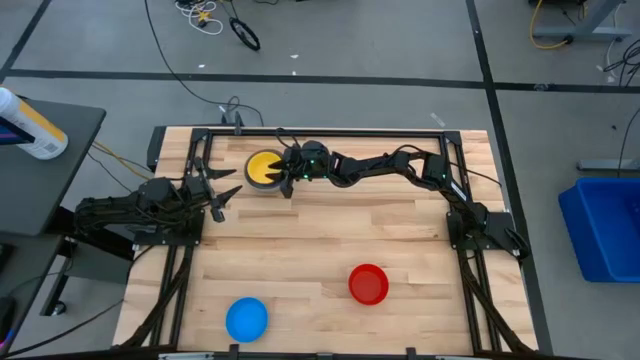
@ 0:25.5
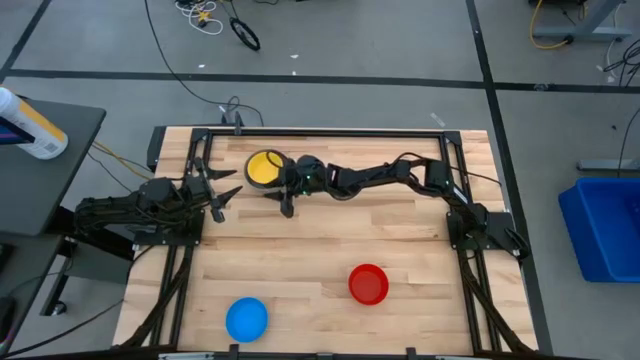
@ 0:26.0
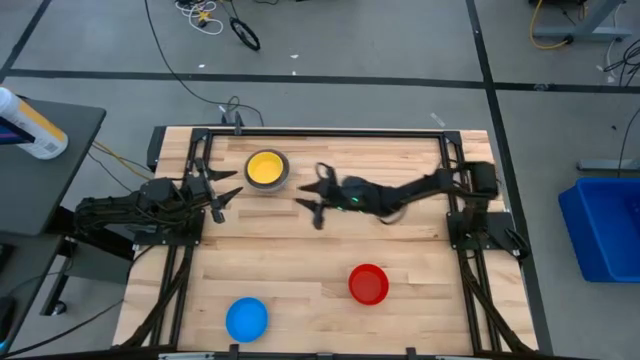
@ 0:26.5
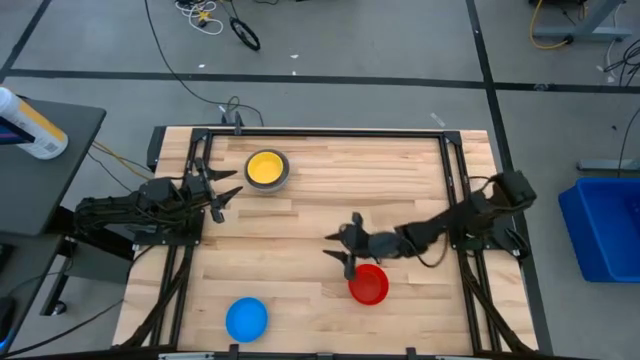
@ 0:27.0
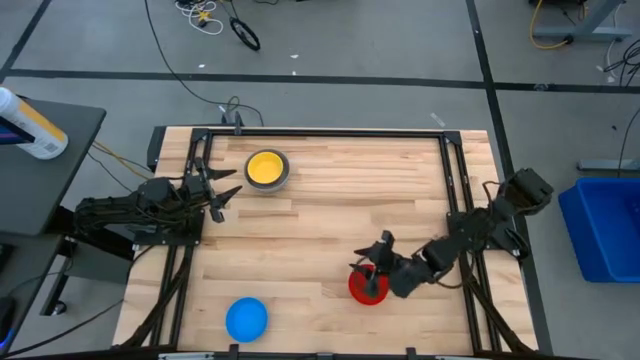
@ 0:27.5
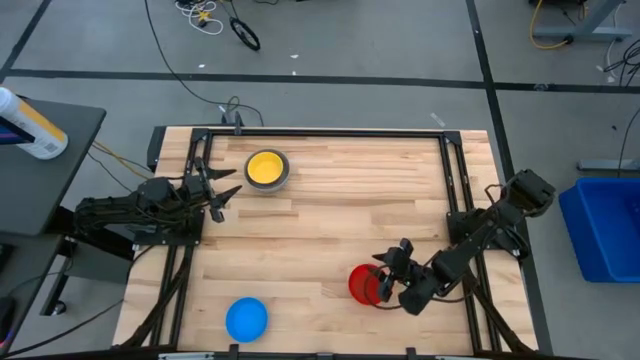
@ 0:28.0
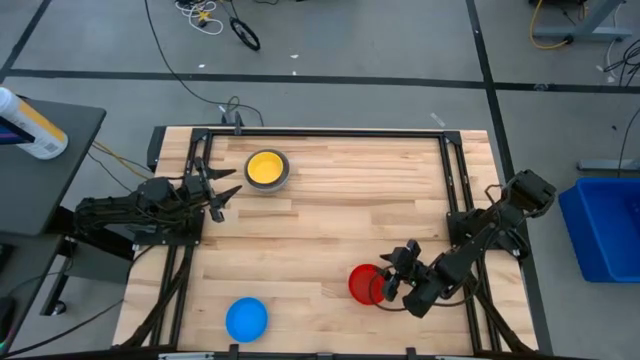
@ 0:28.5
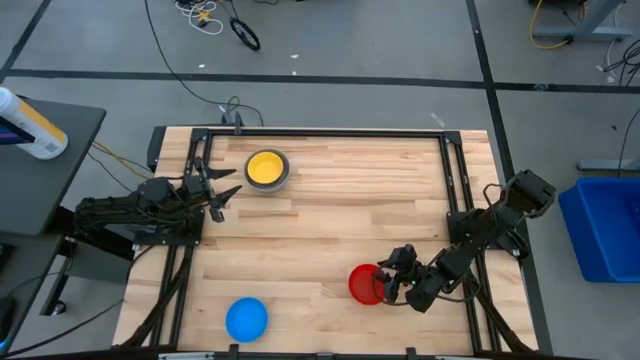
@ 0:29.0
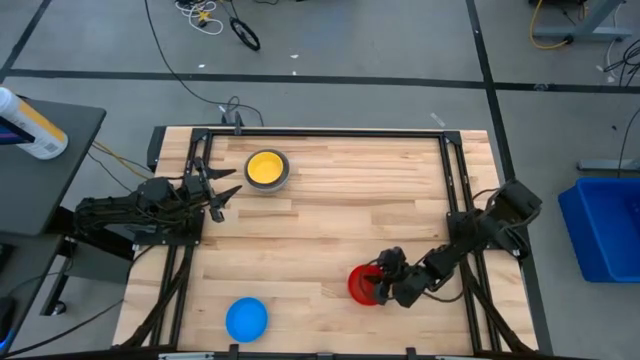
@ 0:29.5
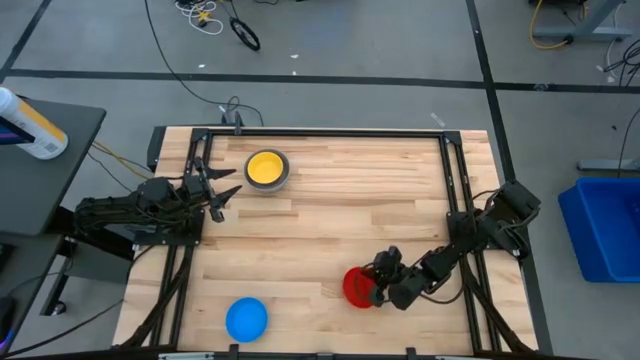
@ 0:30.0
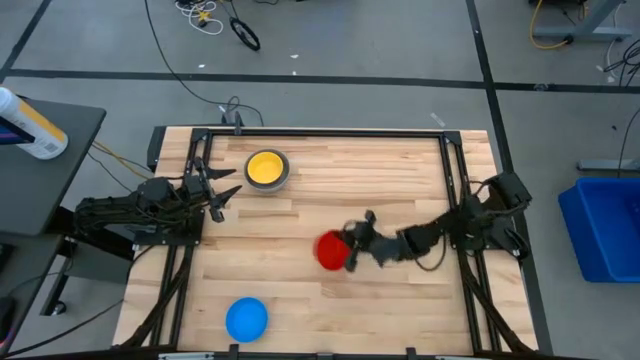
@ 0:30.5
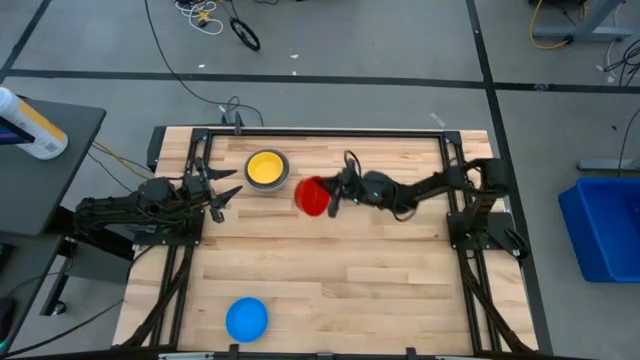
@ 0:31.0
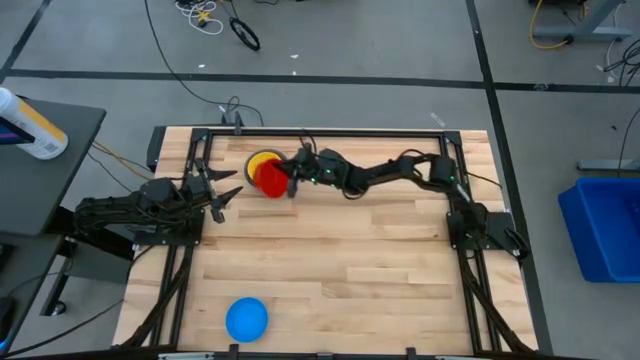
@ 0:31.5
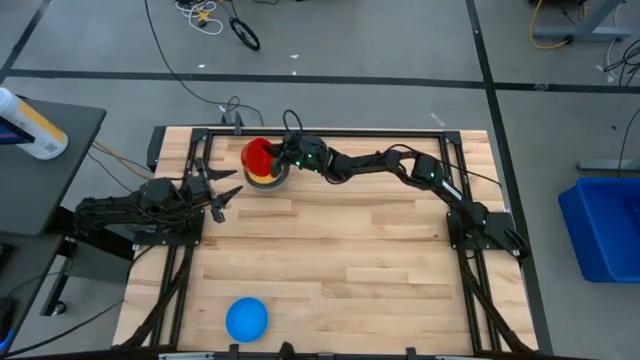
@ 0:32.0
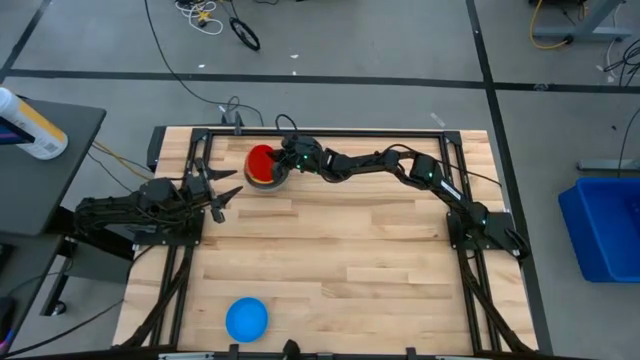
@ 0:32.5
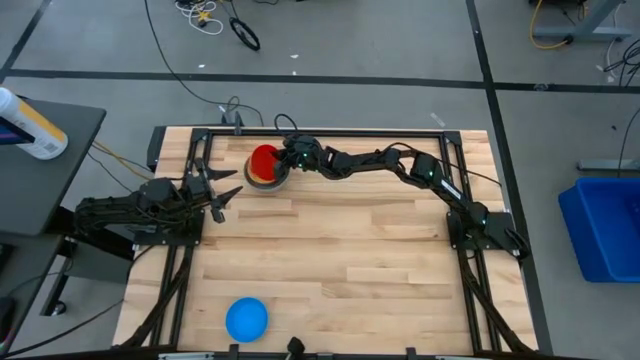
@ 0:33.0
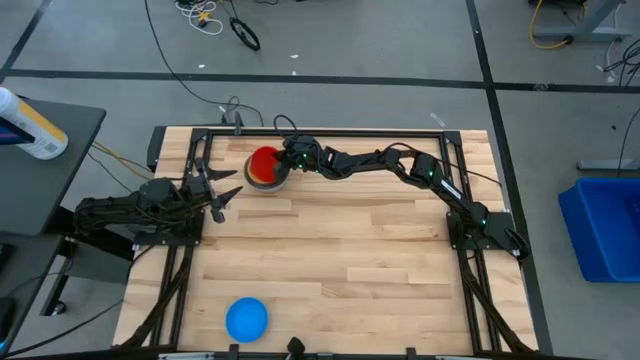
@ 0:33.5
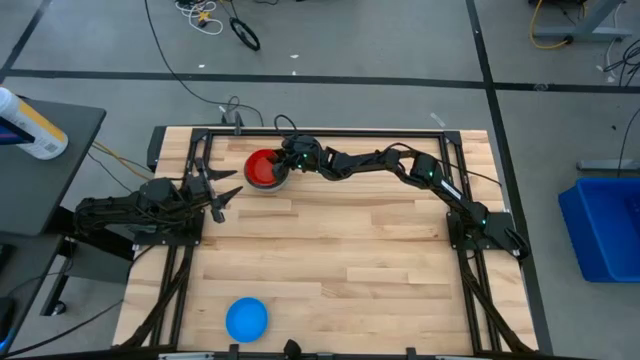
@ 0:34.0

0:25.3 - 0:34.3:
Stack the red bowl on the yellow bowl

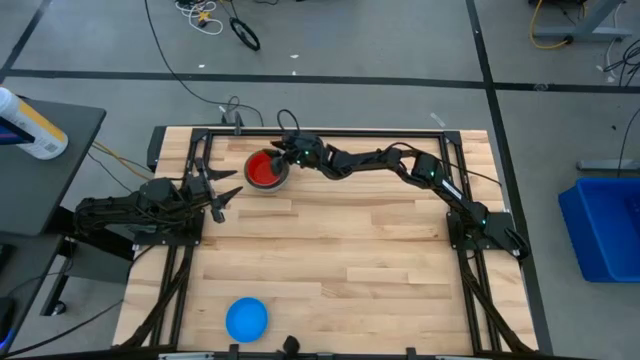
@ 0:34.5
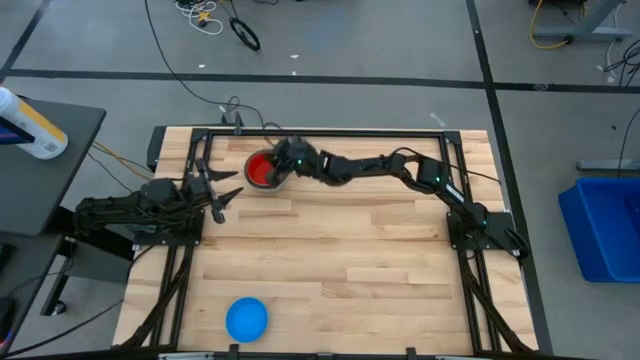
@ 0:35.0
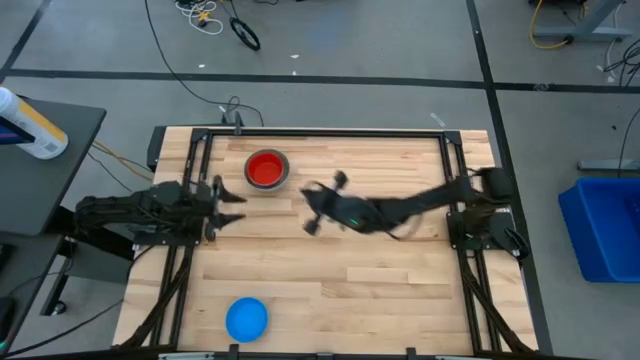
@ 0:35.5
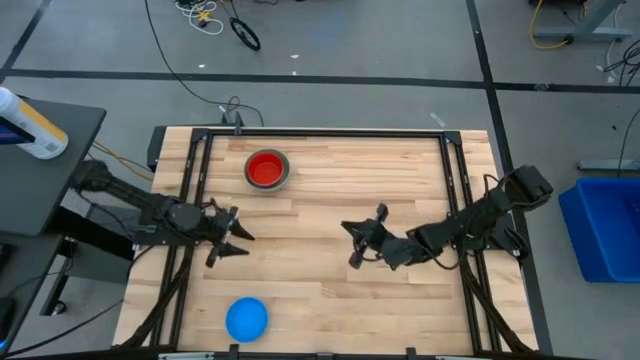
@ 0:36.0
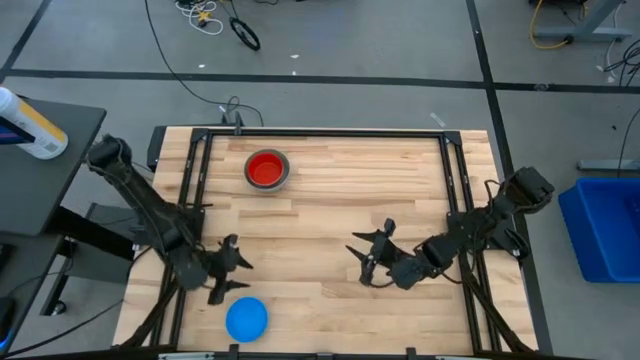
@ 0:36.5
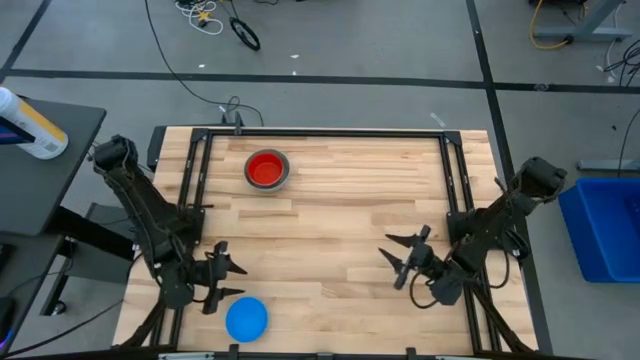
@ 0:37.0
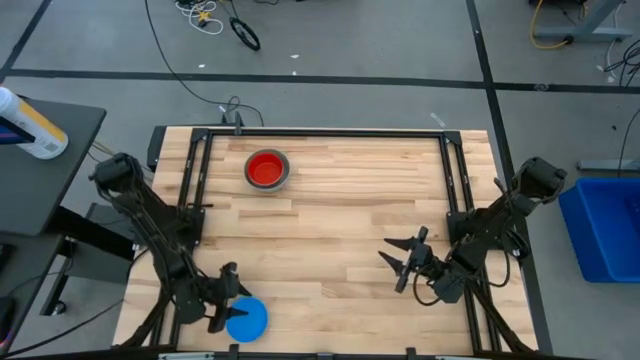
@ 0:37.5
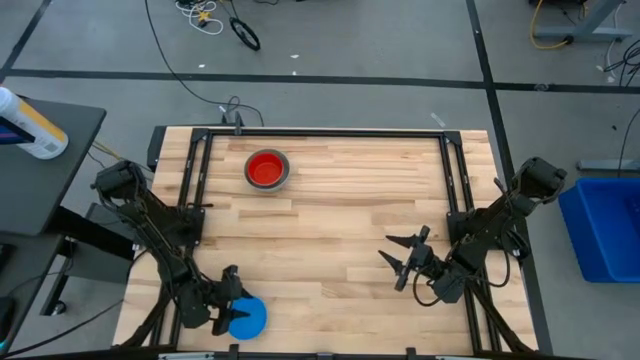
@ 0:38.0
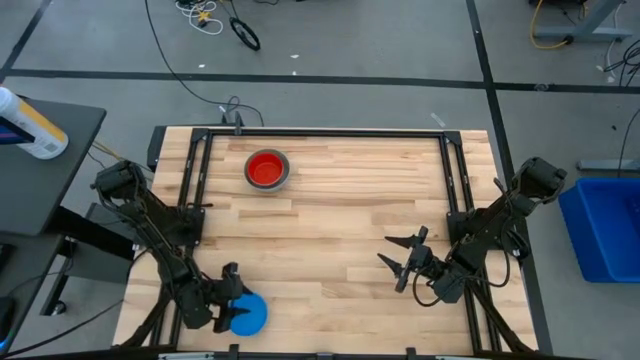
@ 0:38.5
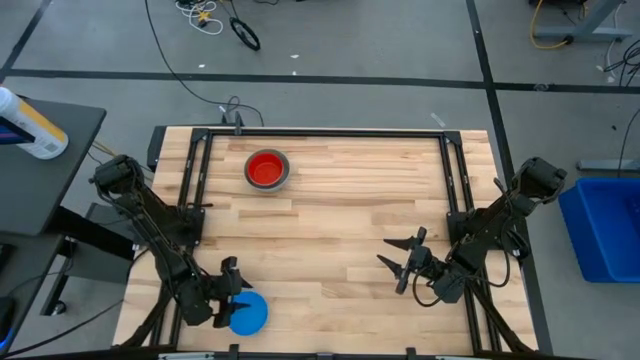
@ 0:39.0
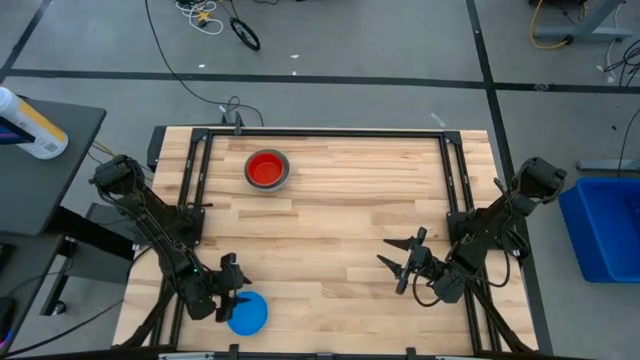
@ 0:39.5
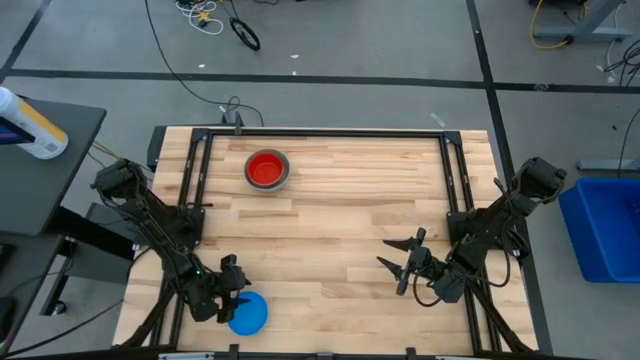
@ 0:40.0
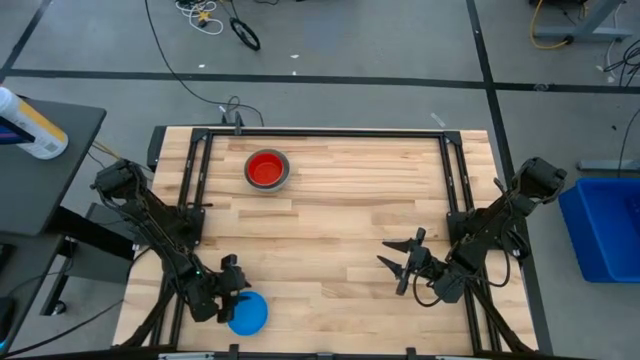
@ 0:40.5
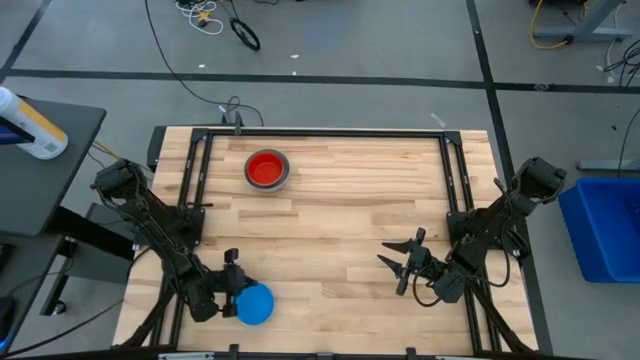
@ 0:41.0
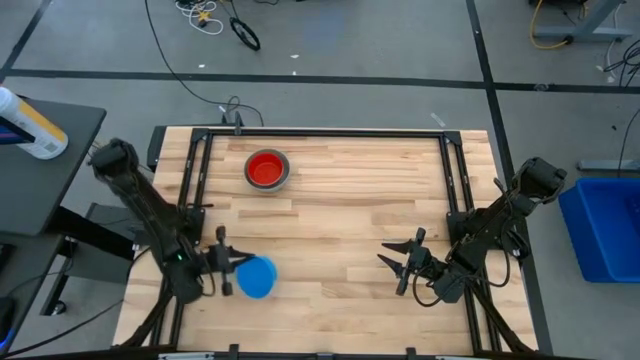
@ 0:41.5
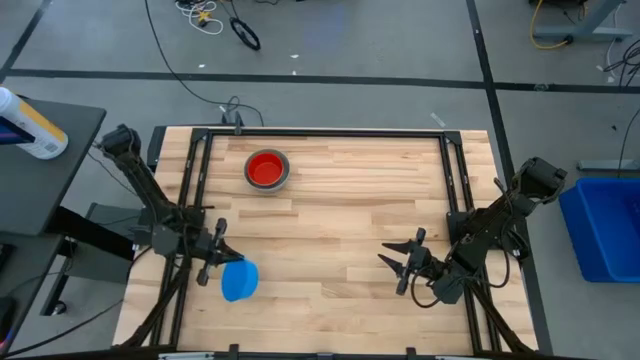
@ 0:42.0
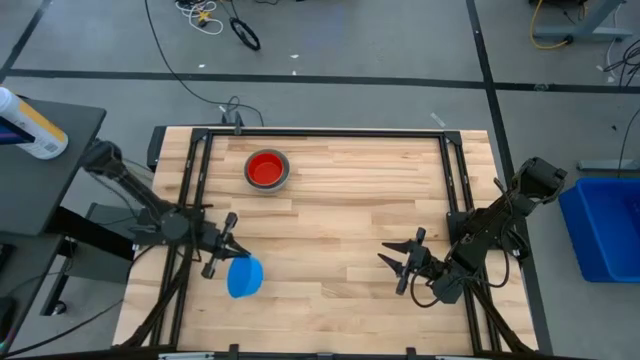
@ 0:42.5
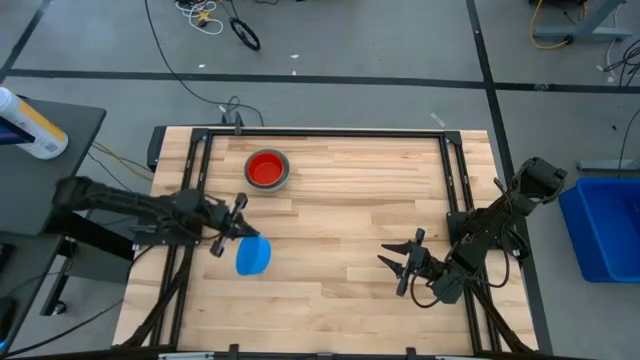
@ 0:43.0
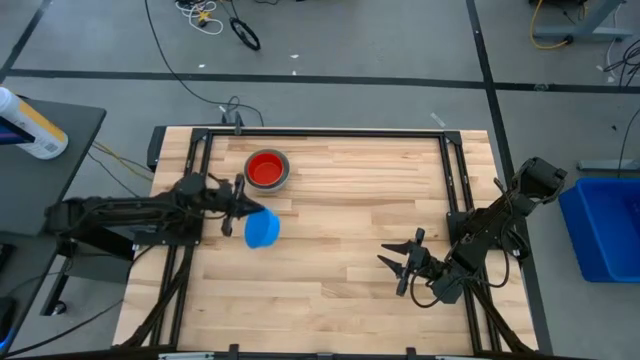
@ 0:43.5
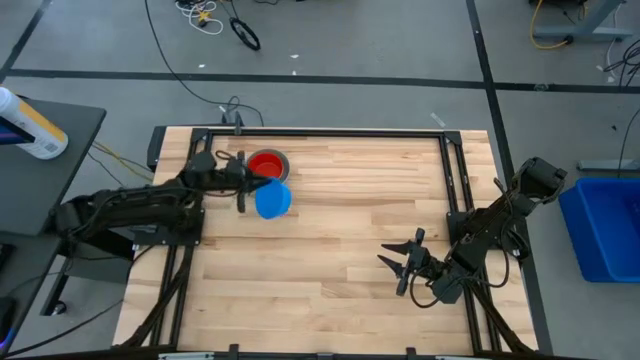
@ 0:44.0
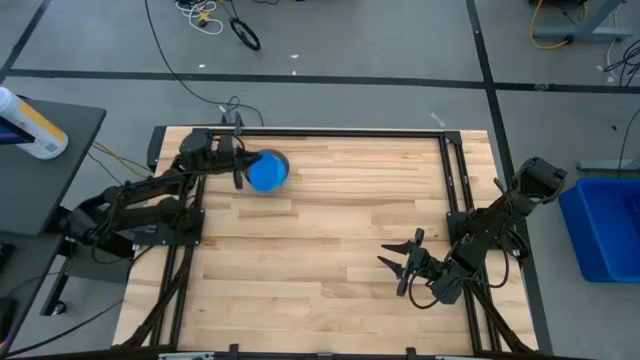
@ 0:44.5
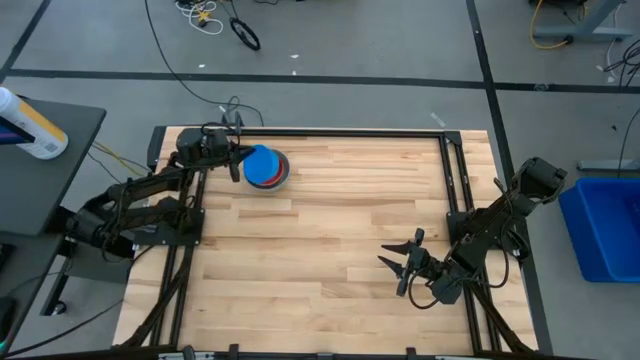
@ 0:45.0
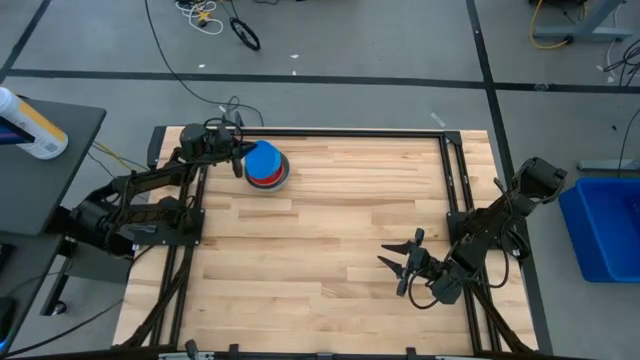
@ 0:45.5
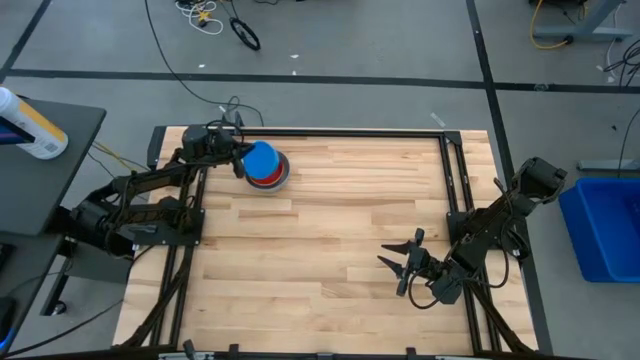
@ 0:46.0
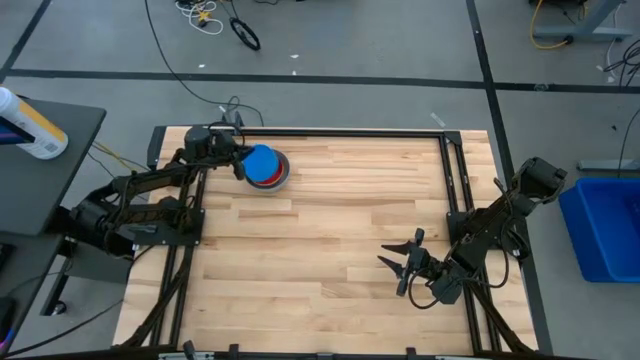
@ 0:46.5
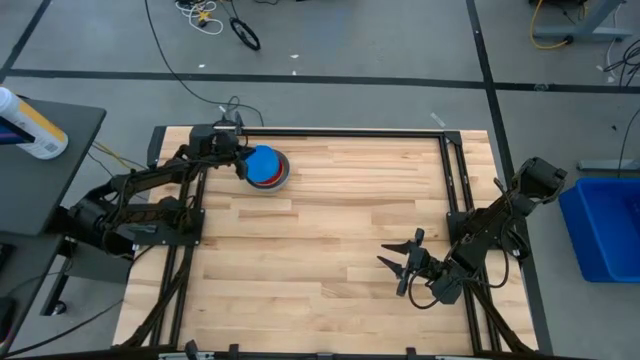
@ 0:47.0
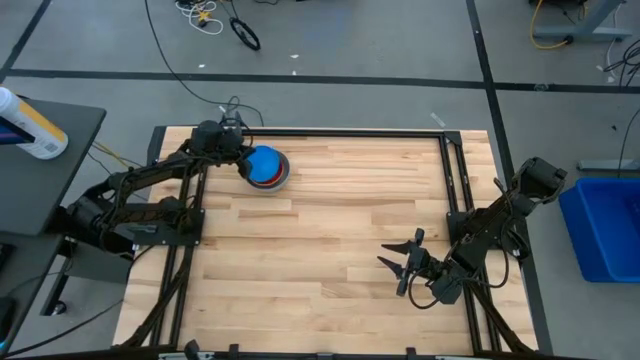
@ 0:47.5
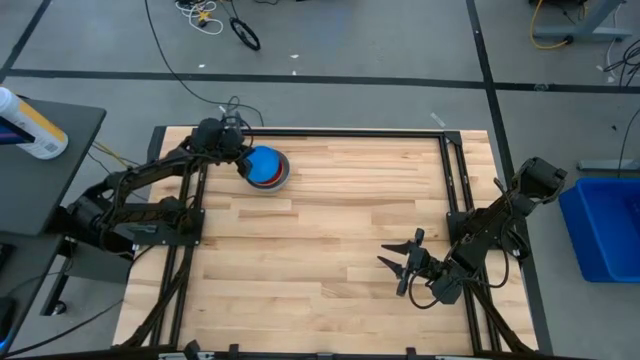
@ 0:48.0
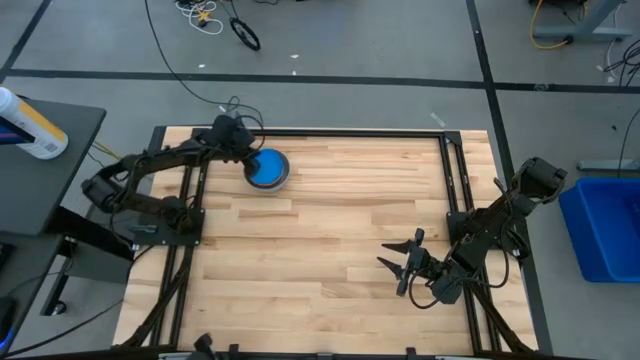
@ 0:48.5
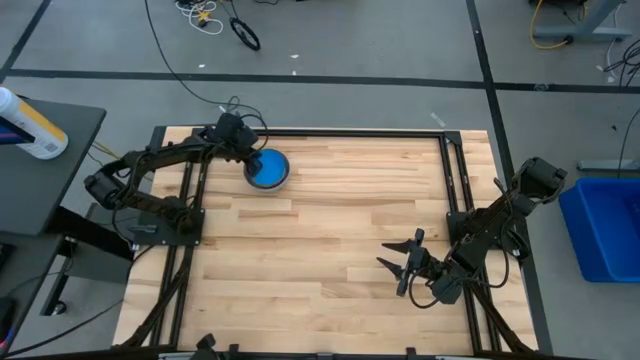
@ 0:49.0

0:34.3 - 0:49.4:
Stack the light blue bowl on the red bowl
